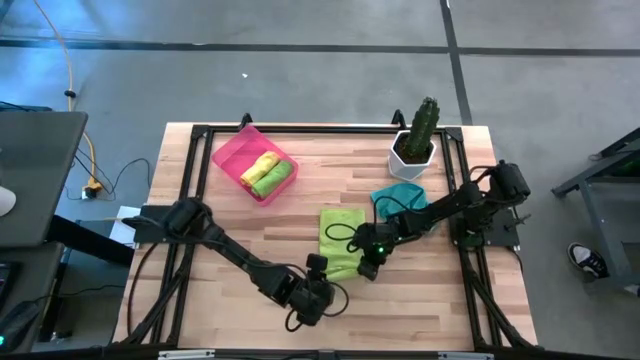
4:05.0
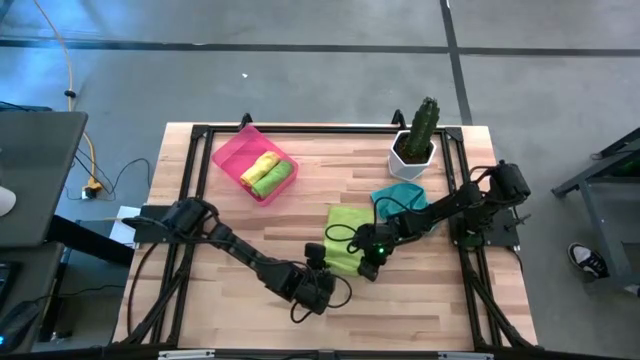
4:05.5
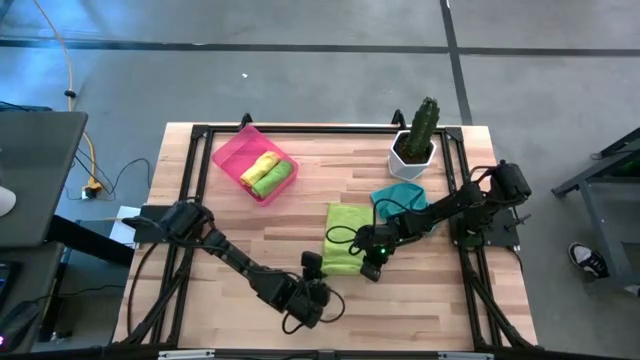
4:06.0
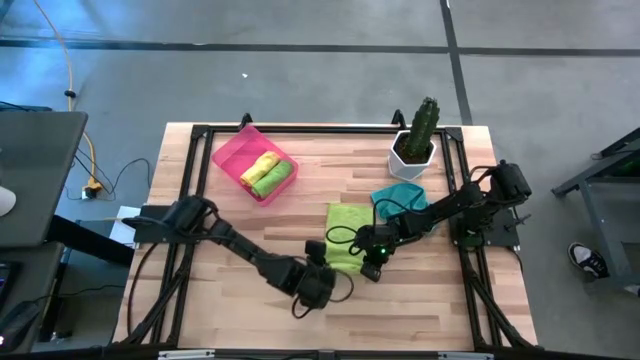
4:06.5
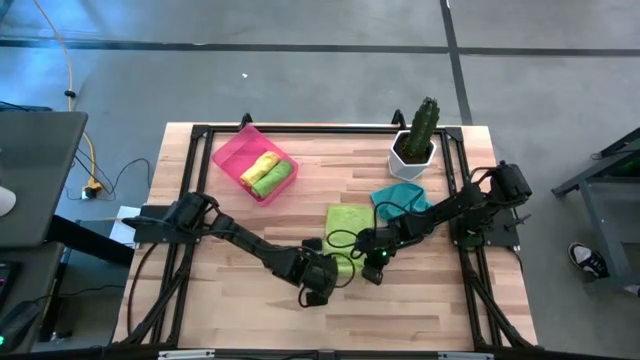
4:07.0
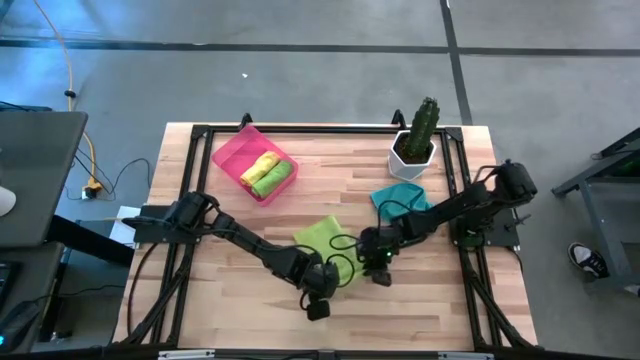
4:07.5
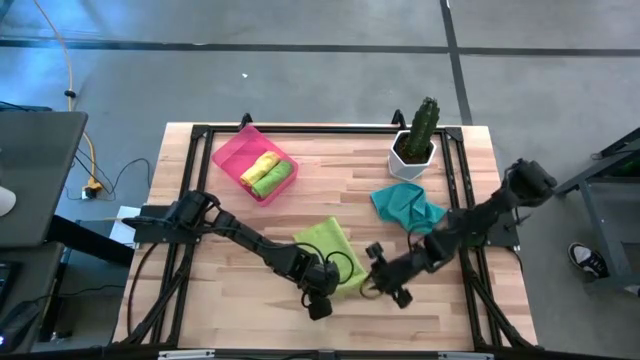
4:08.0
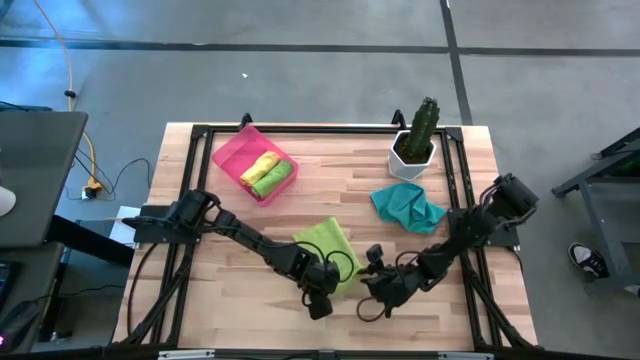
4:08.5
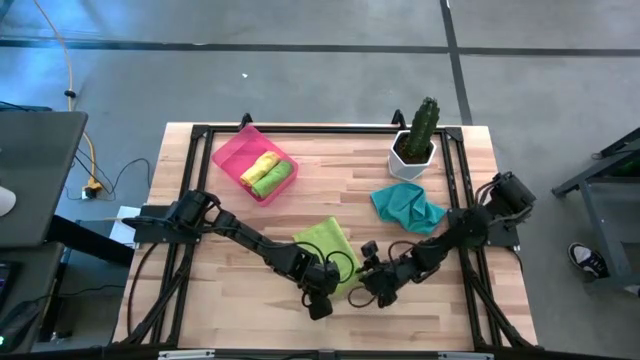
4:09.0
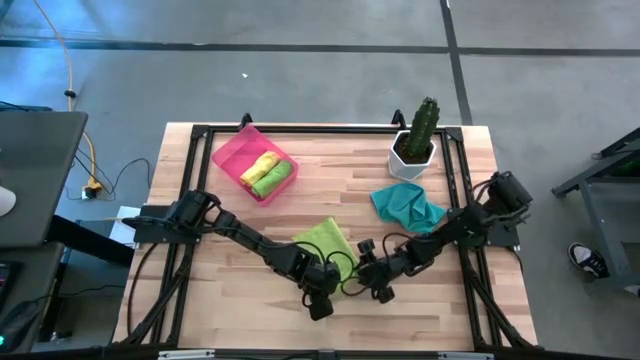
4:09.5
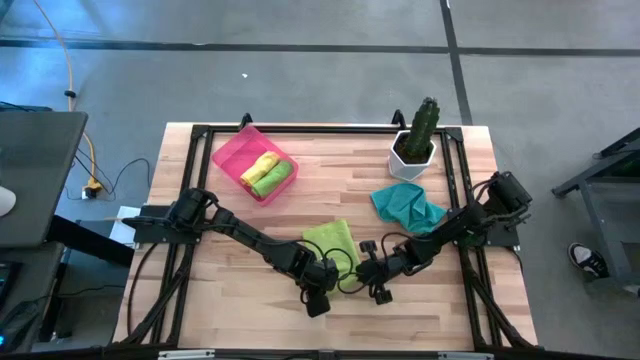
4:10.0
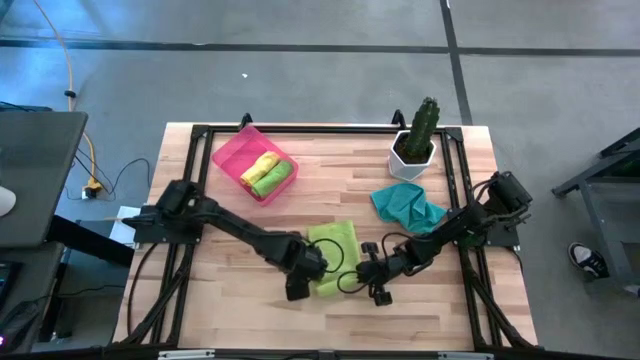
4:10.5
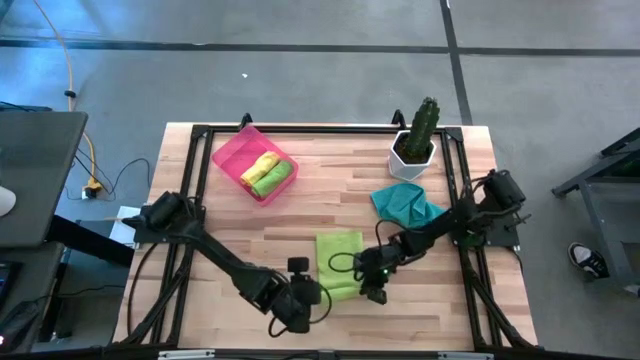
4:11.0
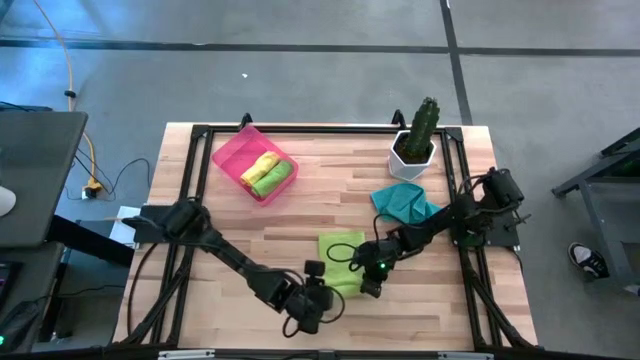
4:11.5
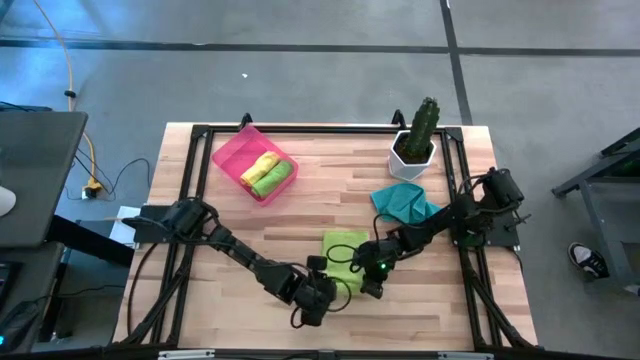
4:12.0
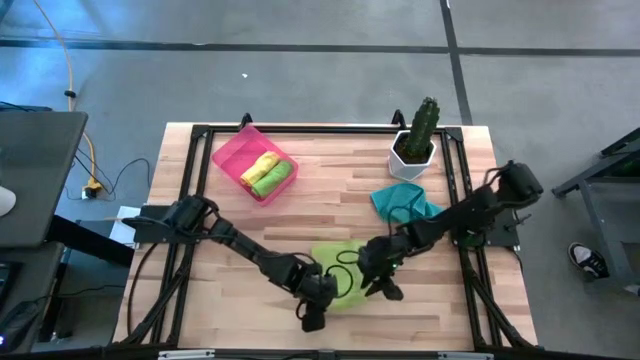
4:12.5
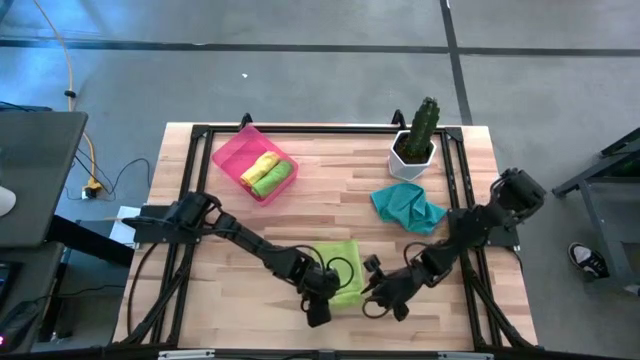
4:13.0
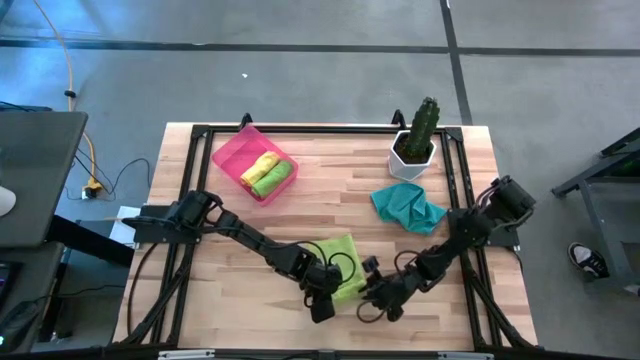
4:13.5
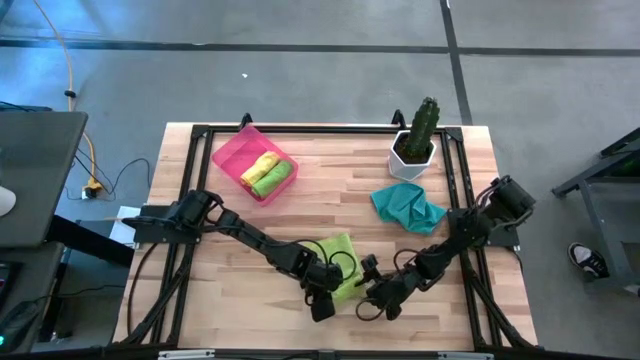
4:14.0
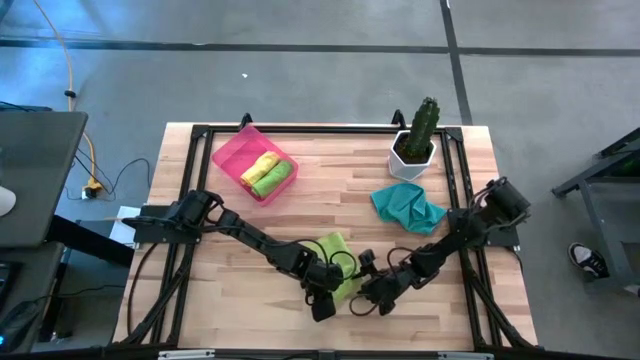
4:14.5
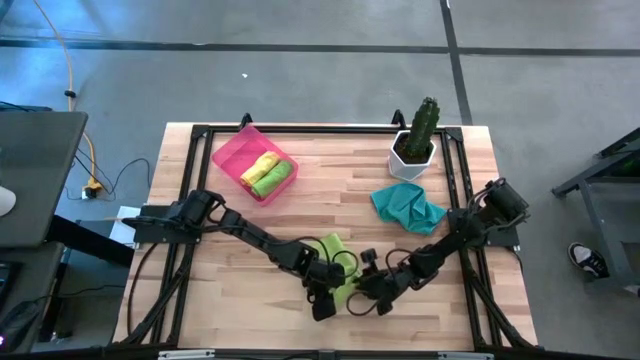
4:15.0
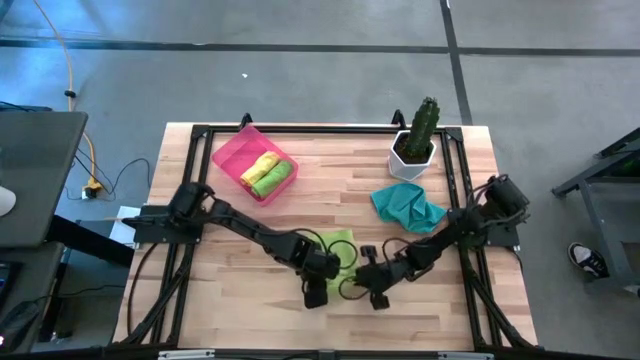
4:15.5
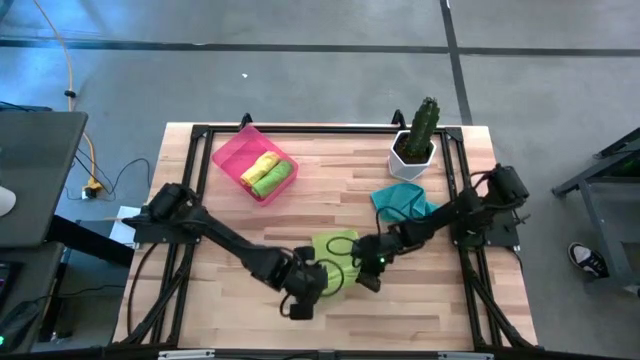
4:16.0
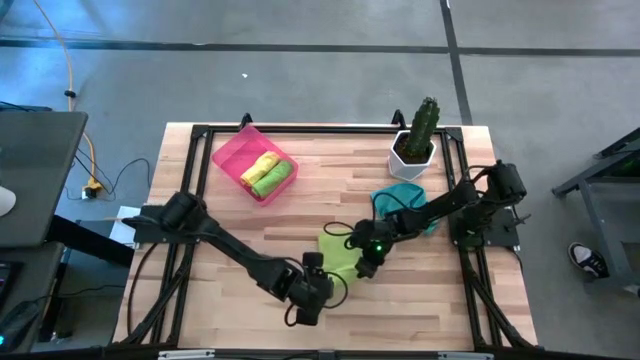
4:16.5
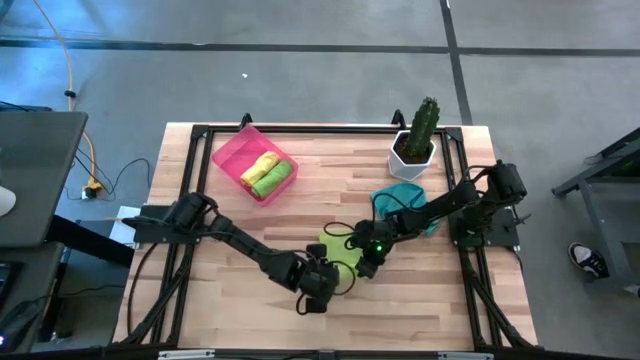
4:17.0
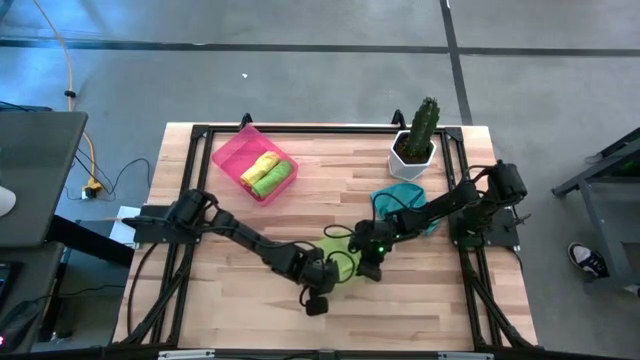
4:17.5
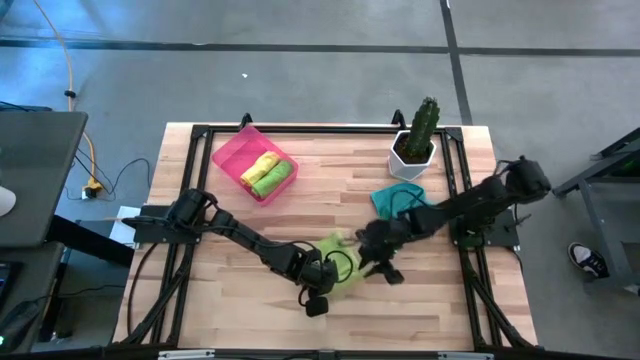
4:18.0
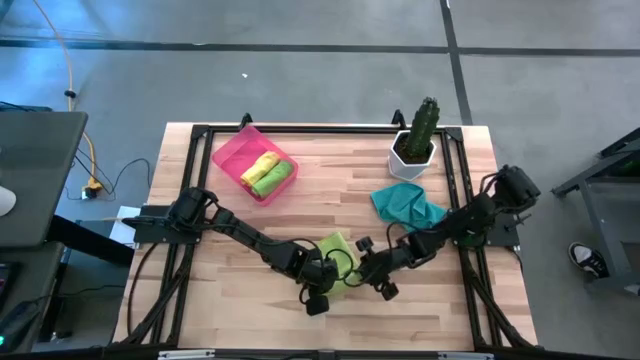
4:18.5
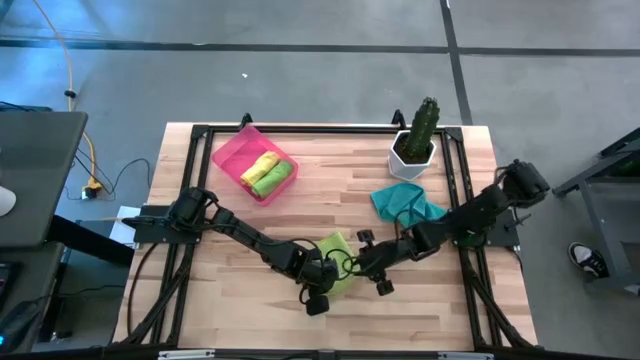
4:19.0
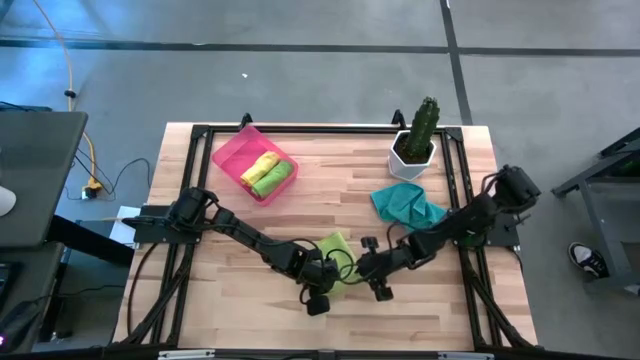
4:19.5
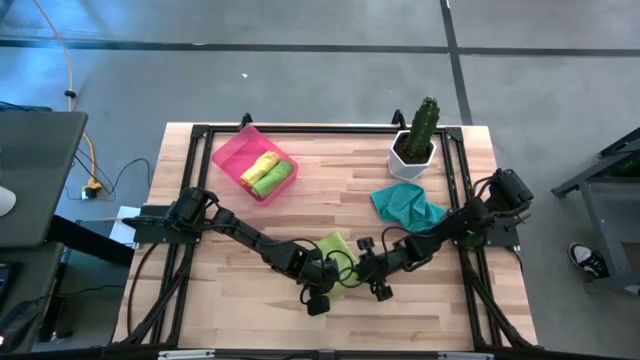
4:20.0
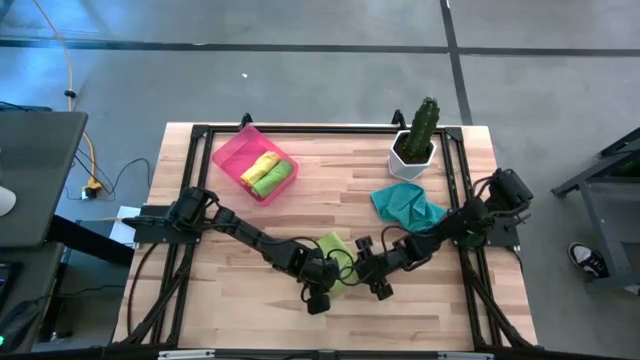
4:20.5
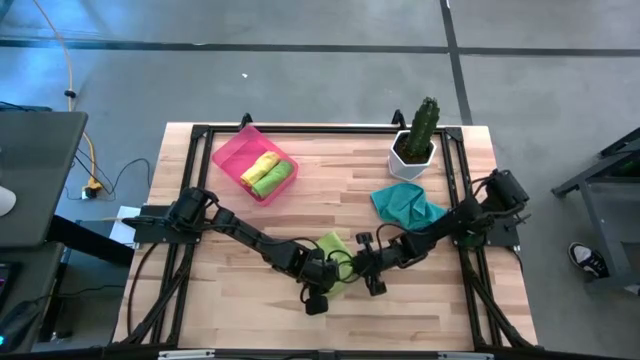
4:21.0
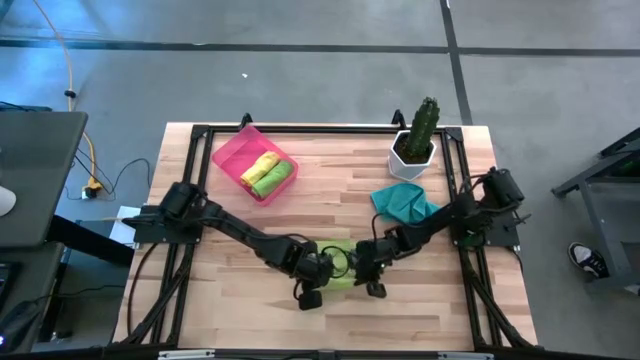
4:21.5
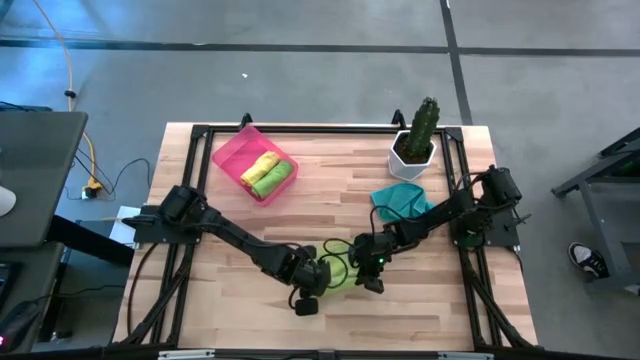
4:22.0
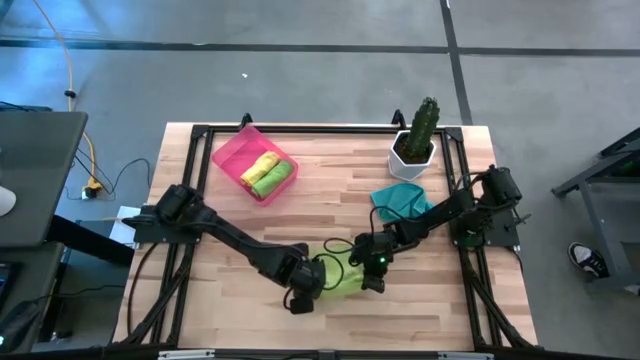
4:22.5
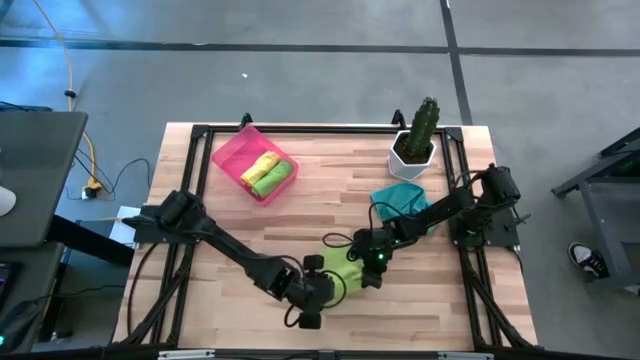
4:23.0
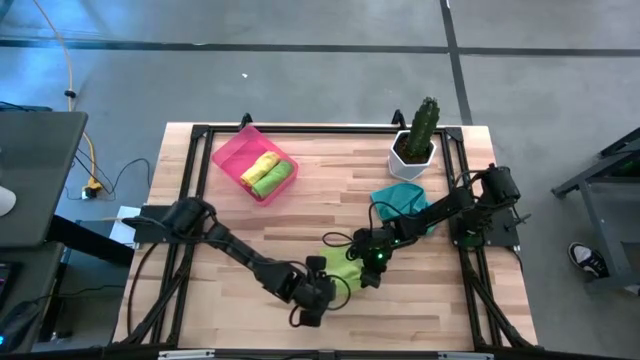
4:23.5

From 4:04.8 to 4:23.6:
Task: Roll microfiber towels into tight, uniform cylinder then place into a basket
Roll the light green microfiber cloth

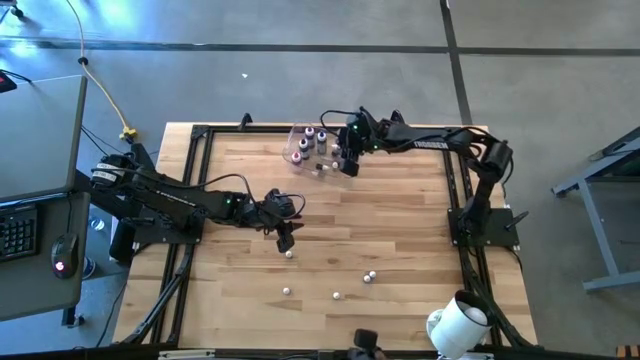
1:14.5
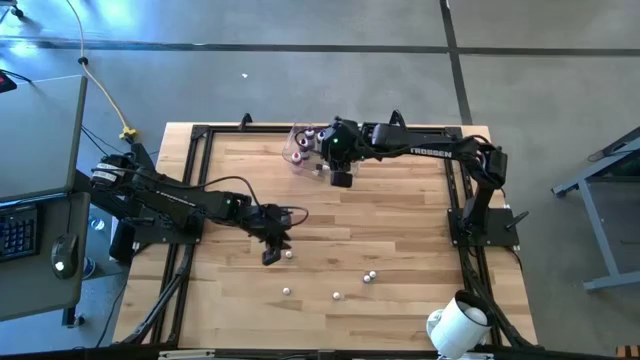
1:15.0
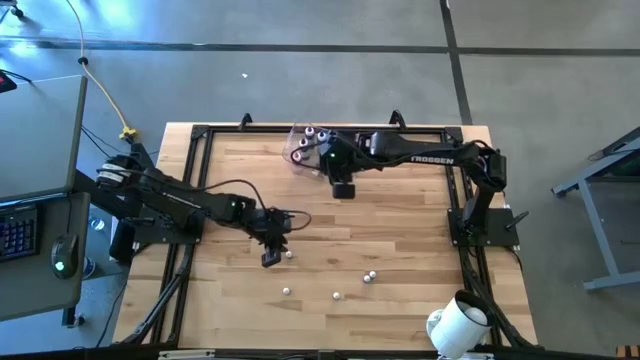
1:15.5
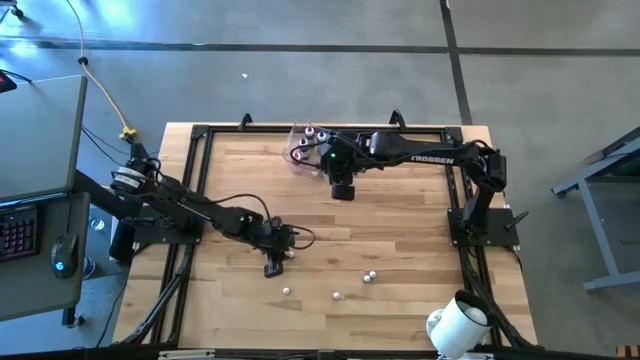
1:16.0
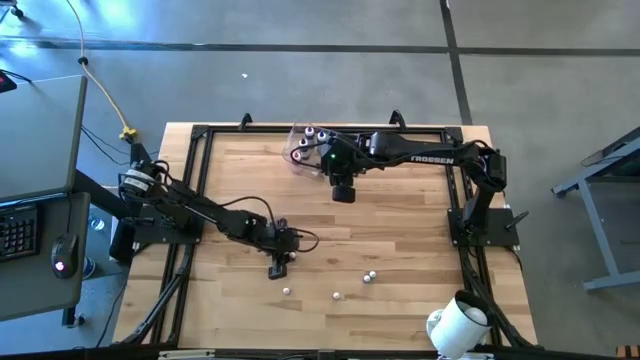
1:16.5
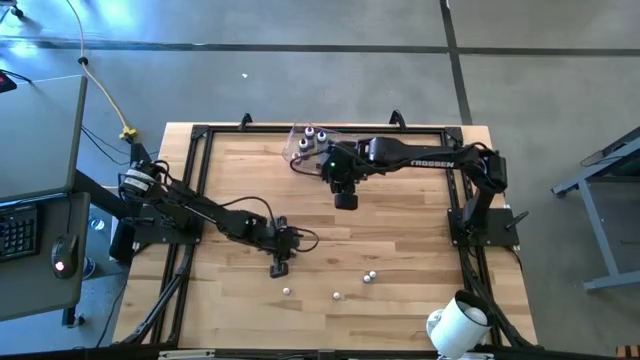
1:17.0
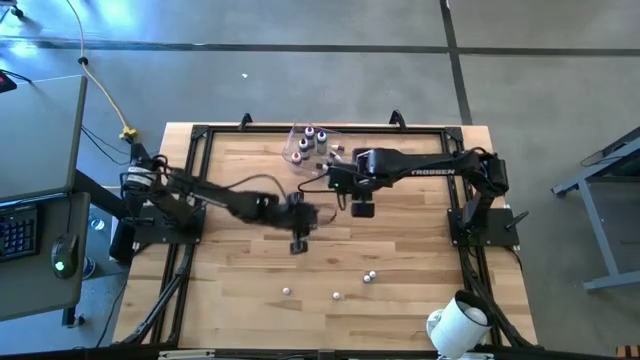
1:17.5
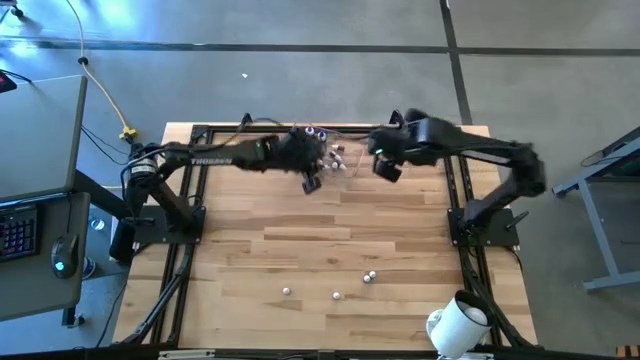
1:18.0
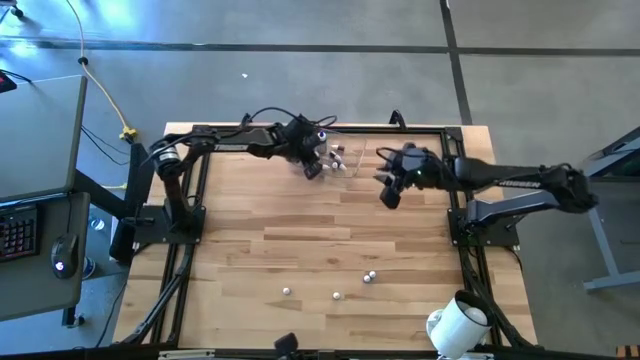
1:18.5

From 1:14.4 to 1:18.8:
Task: Pick & Place food coloring
Put the purple food coloring into the transparent bin
